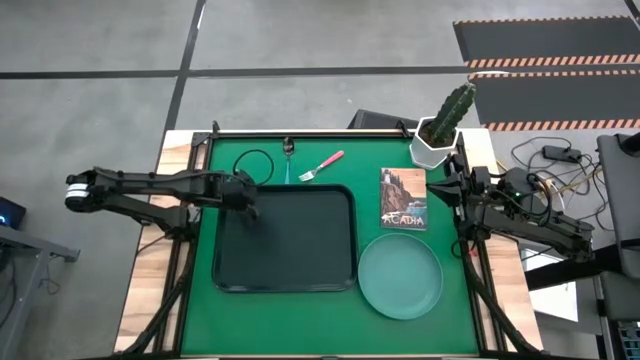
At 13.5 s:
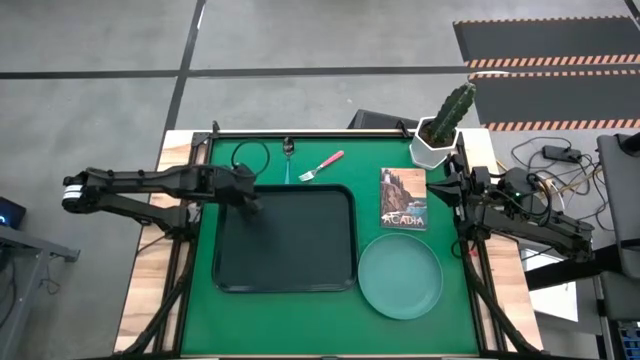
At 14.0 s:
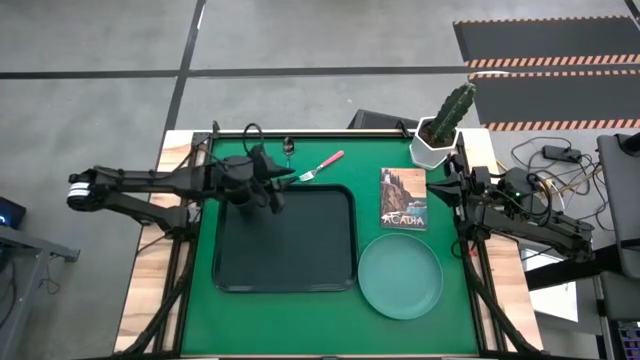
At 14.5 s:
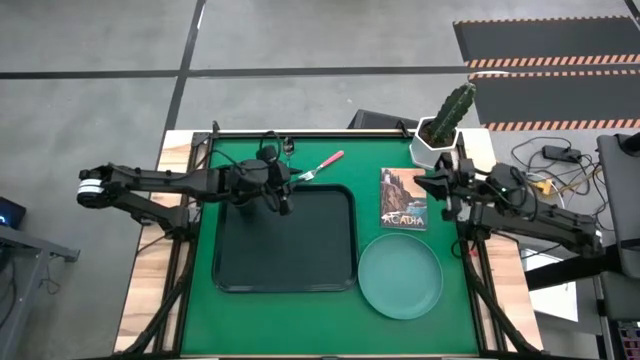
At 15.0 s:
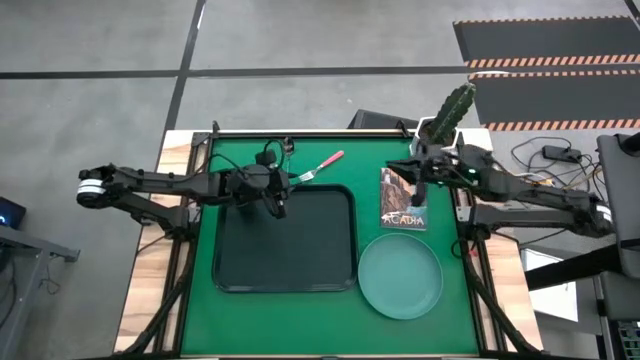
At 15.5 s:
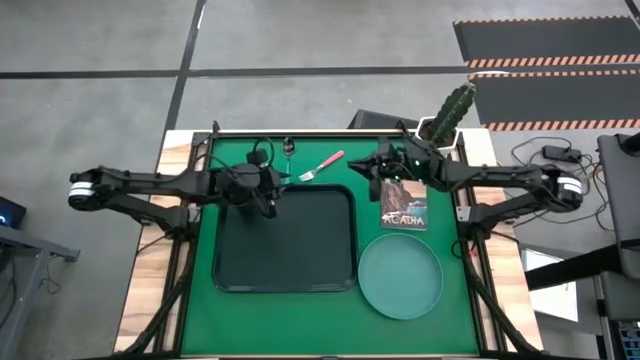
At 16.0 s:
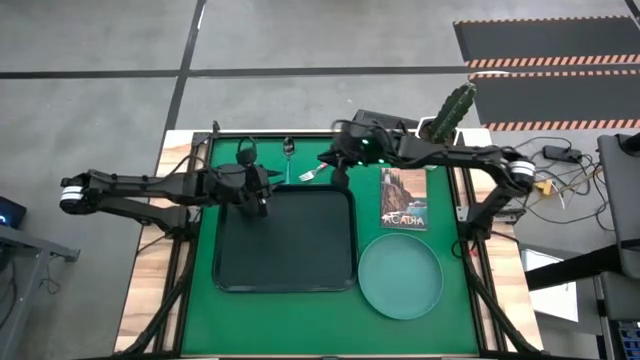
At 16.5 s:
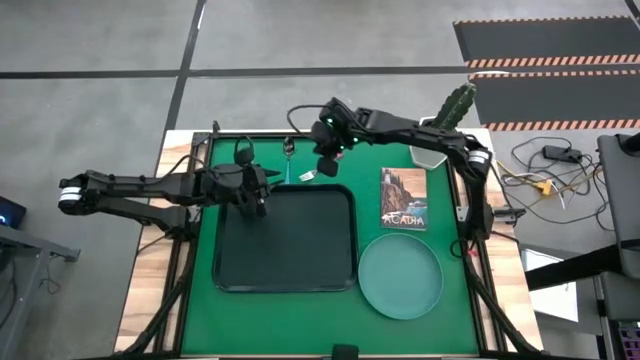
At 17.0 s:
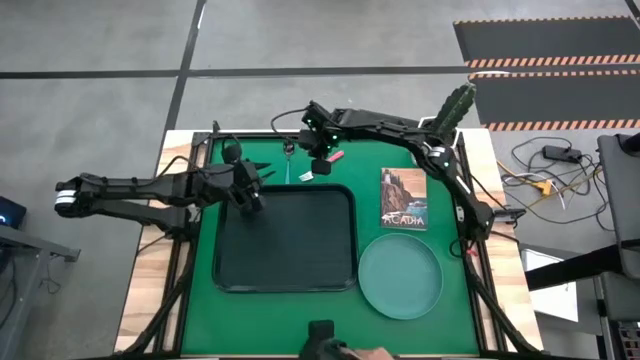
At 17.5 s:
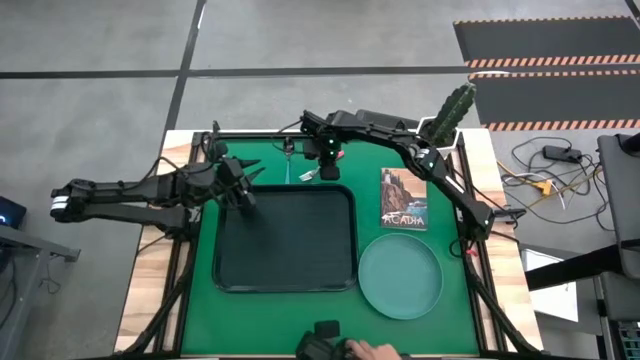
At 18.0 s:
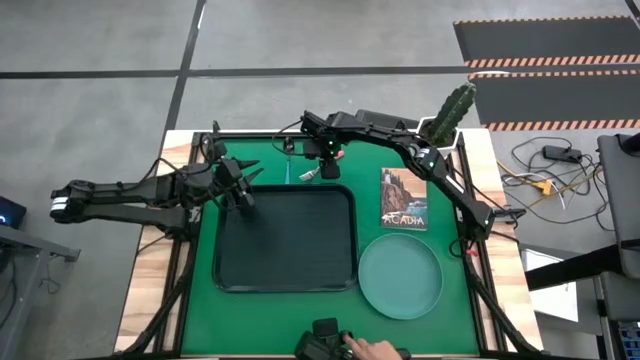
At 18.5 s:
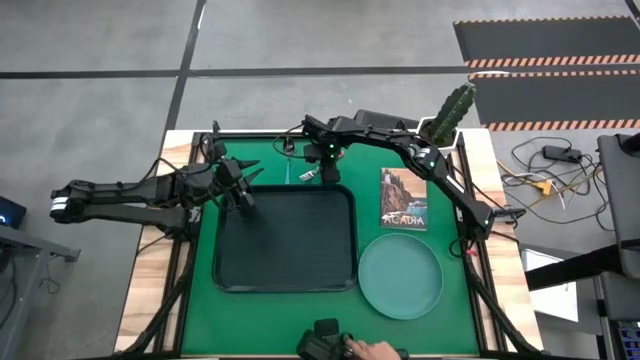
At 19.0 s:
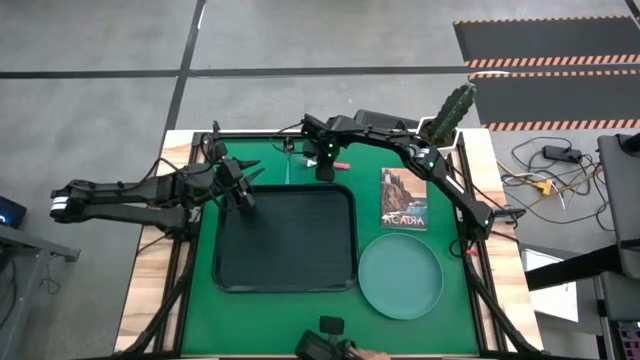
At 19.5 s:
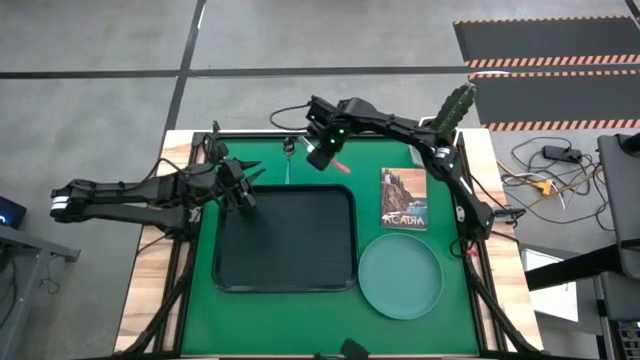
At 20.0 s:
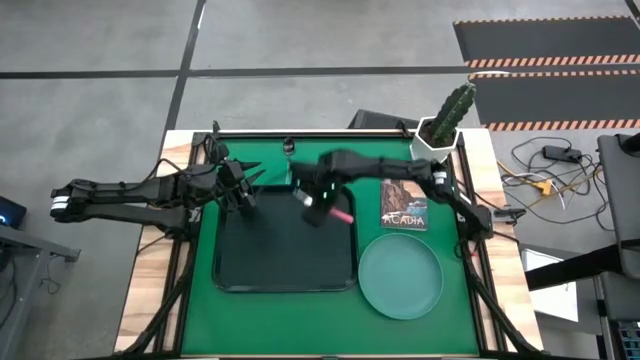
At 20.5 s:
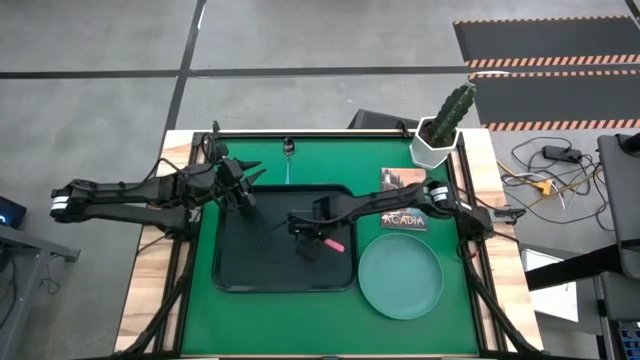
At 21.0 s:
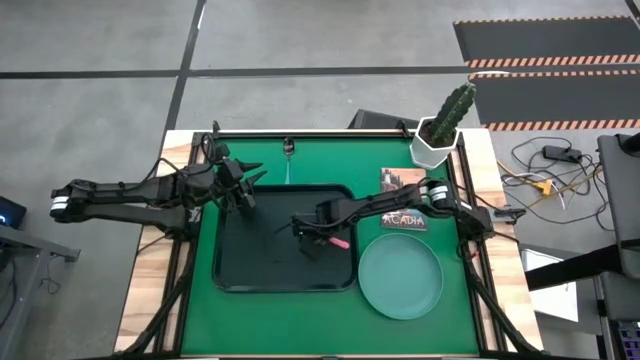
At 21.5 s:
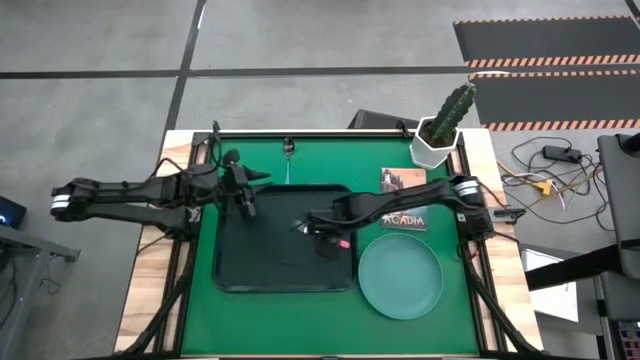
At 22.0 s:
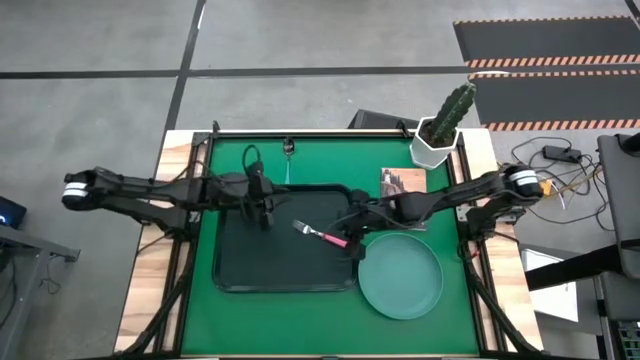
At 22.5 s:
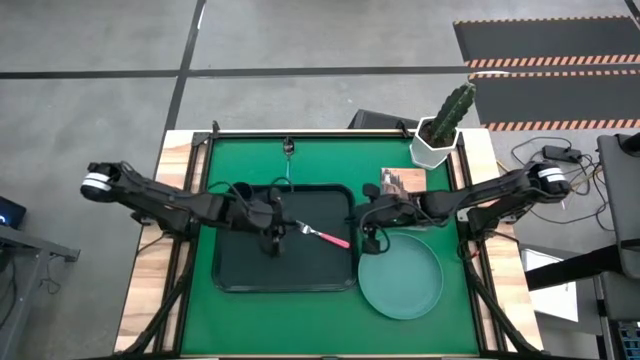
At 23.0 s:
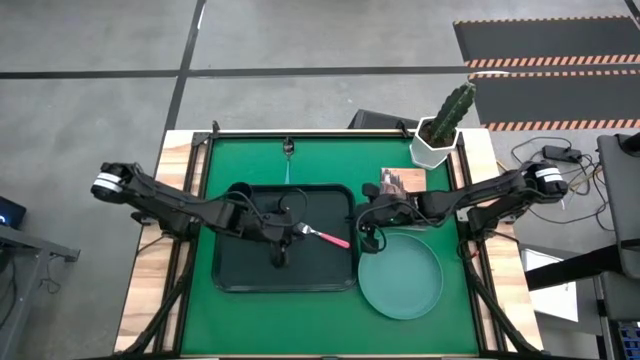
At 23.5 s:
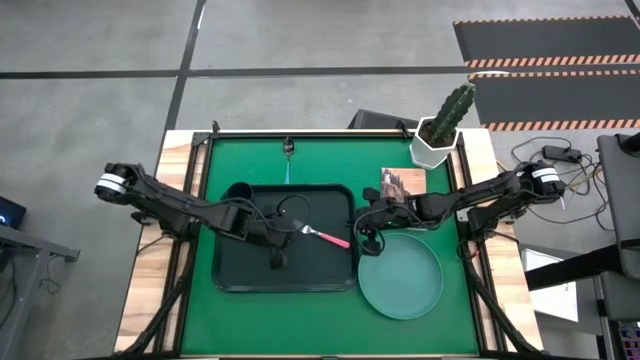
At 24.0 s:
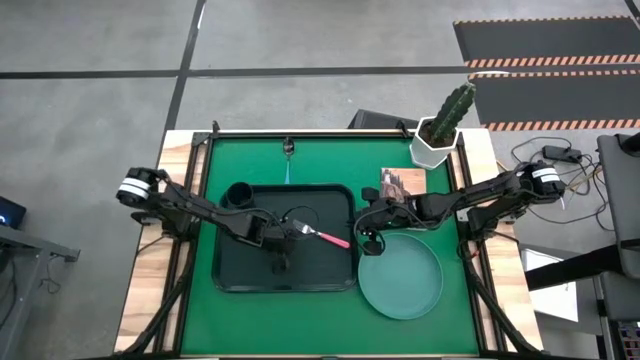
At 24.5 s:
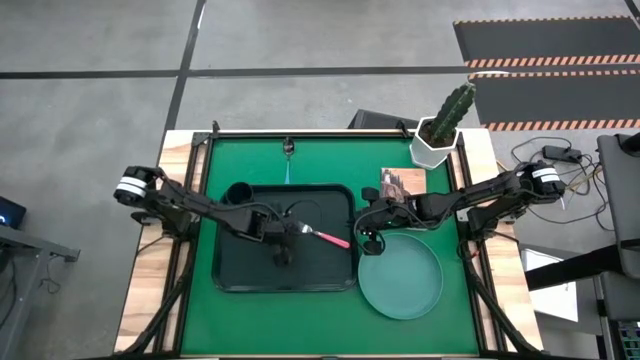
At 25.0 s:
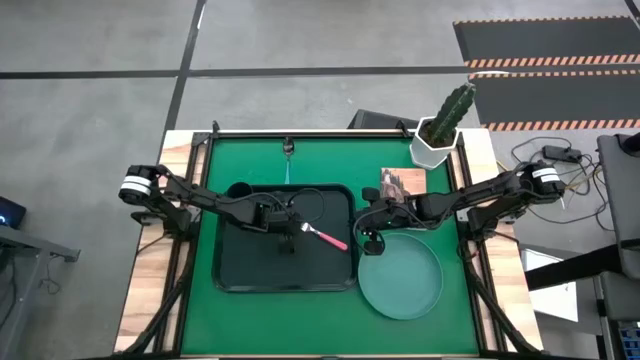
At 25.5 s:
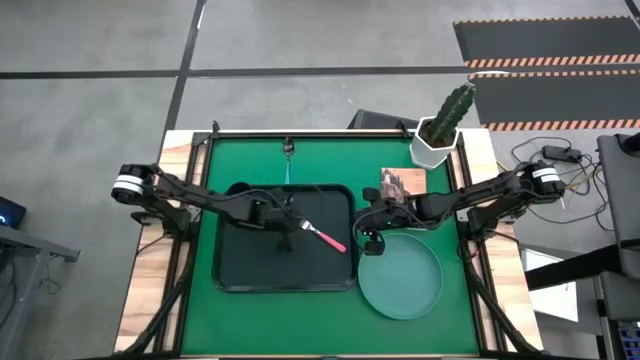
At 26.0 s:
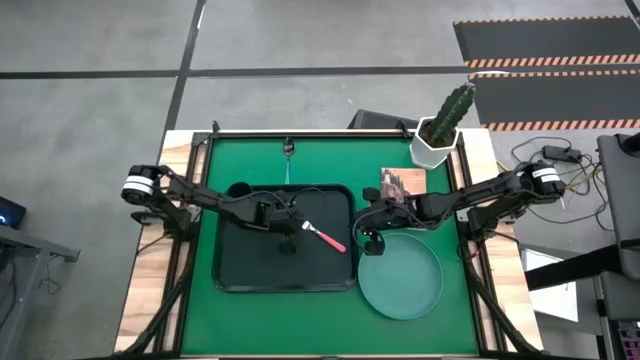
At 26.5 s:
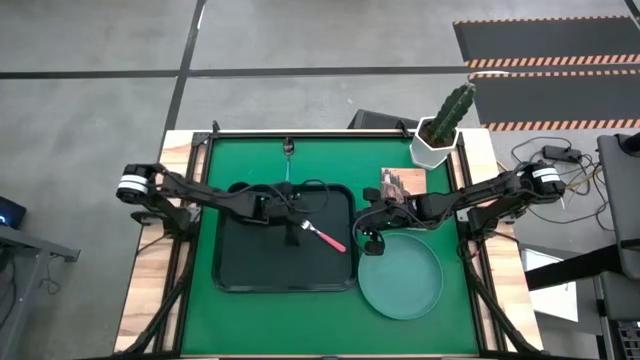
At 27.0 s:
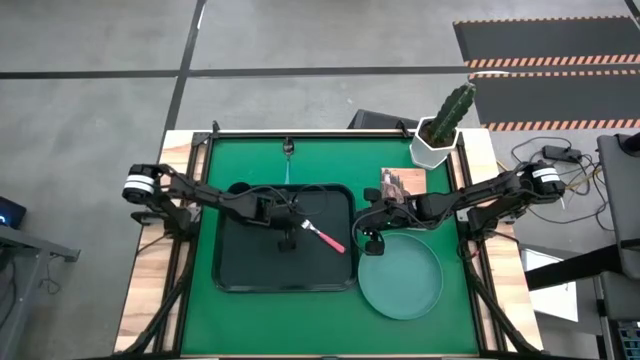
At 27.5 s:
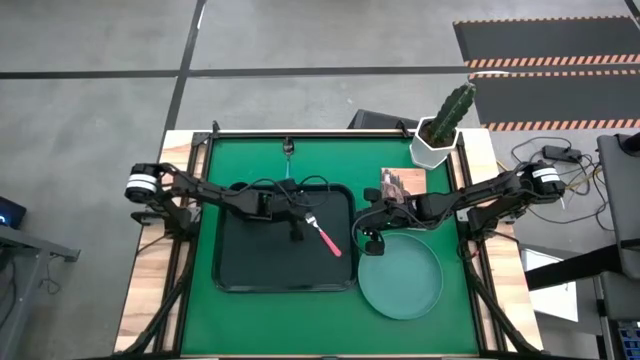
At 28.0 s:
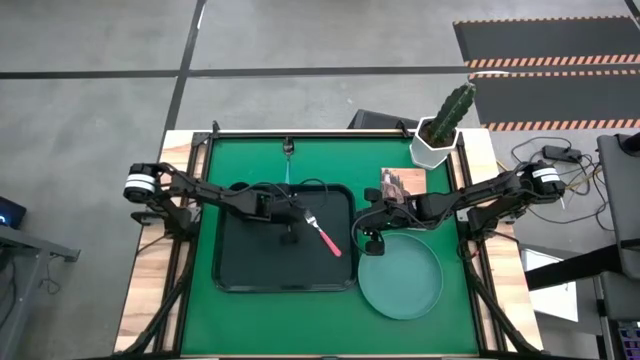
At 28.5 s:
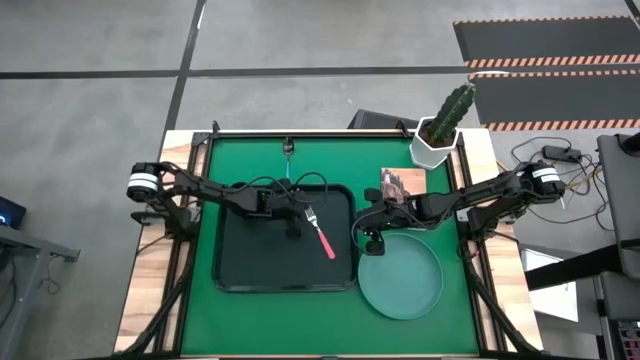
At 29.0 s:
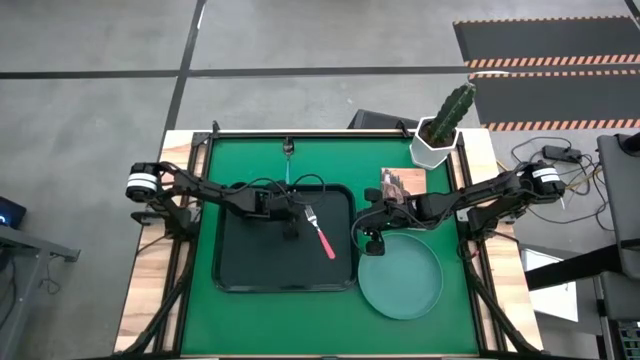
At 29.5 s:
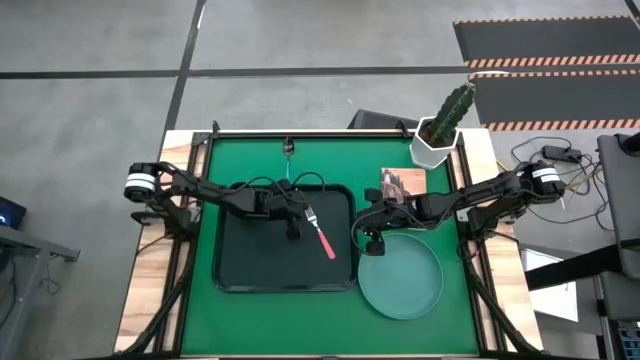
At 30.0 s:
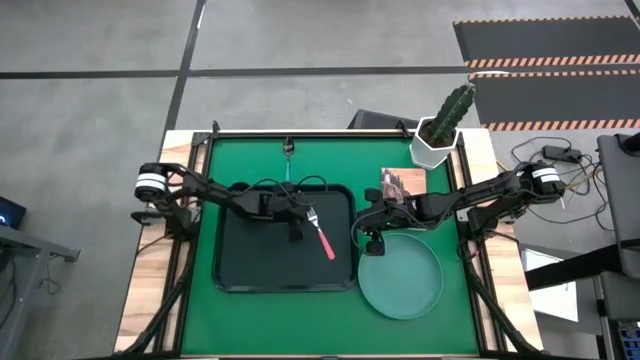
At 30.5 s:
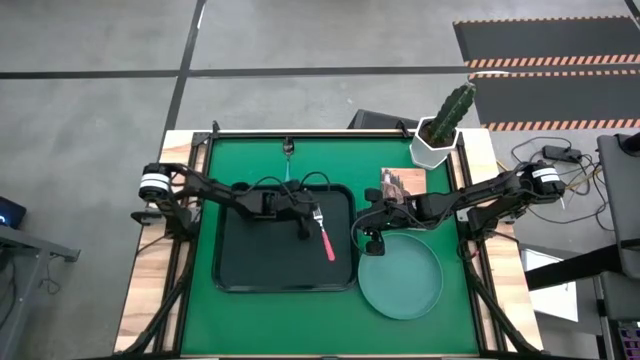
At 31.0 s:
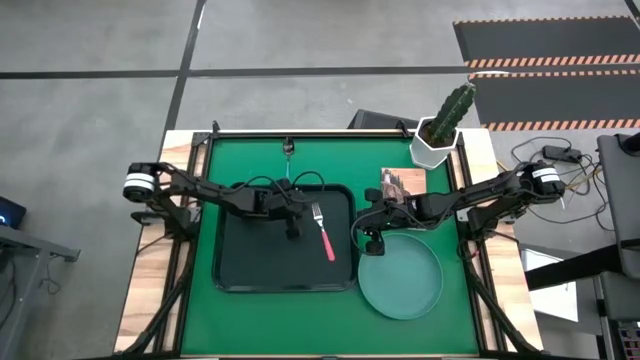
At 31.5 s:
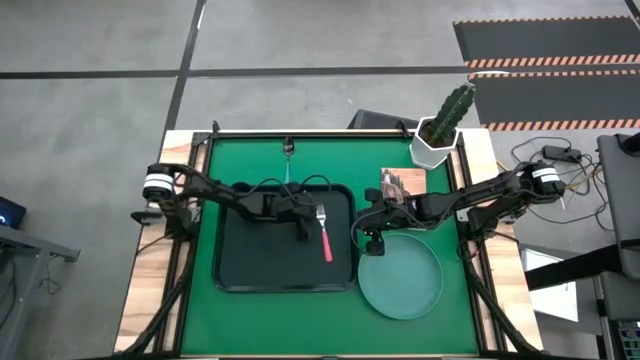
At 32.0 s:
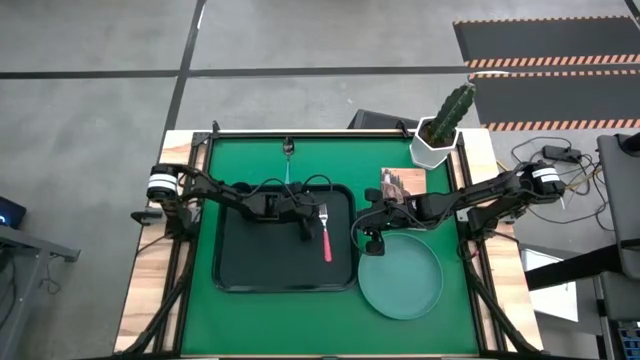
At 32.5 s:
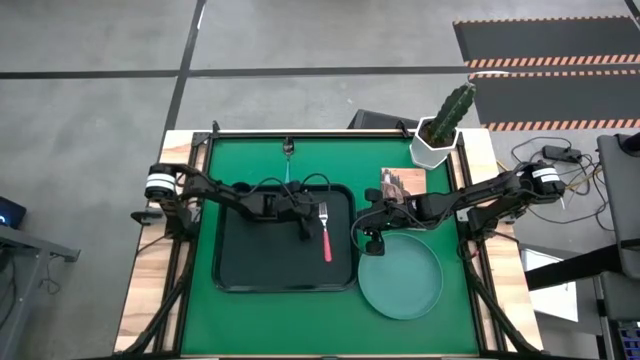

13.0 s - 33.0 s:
Task: Pick and place plate/cup/fork/spoon on tray
Put the pink fork on the black serving tray
